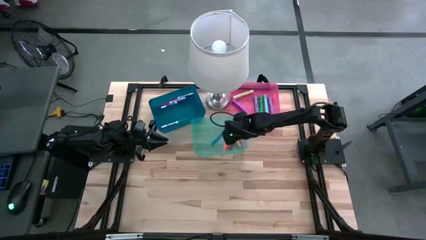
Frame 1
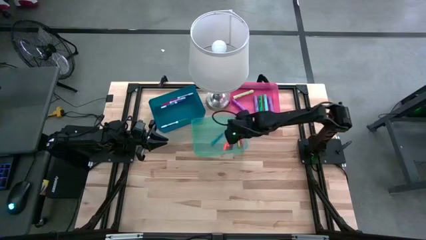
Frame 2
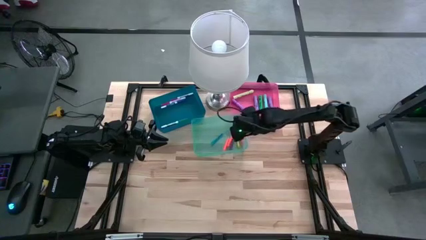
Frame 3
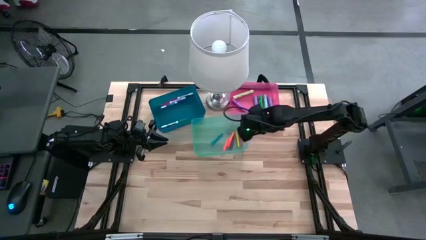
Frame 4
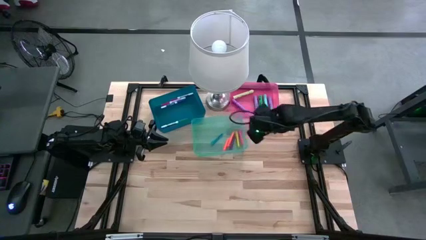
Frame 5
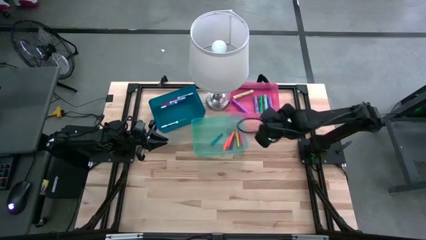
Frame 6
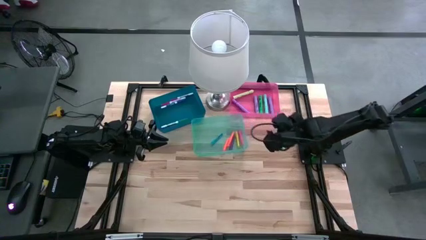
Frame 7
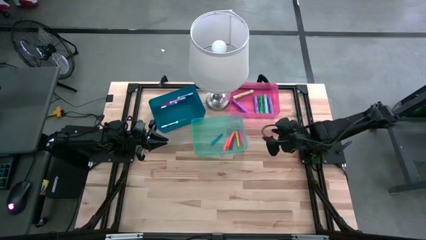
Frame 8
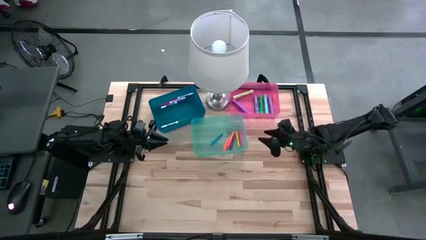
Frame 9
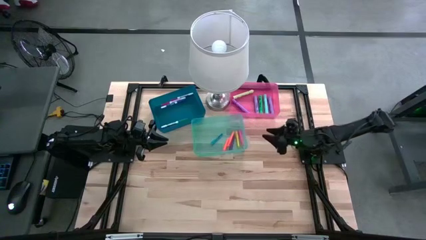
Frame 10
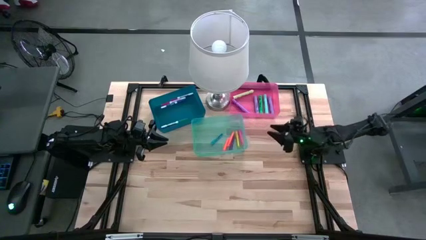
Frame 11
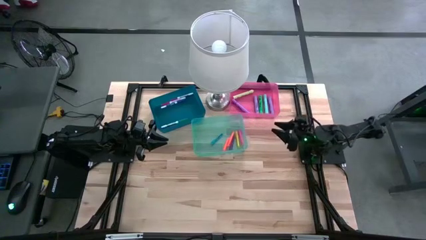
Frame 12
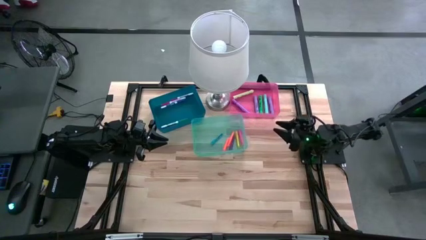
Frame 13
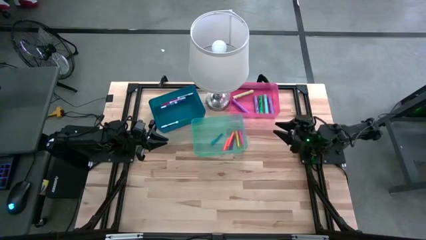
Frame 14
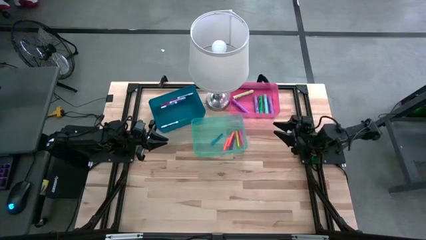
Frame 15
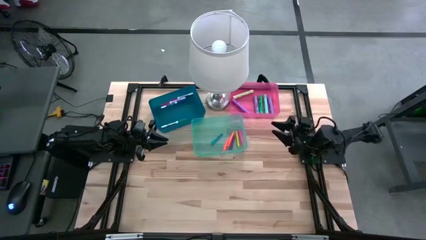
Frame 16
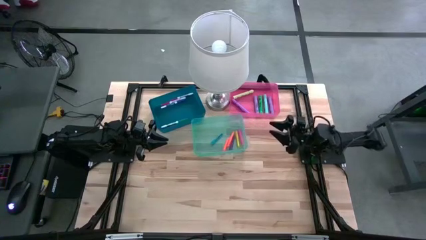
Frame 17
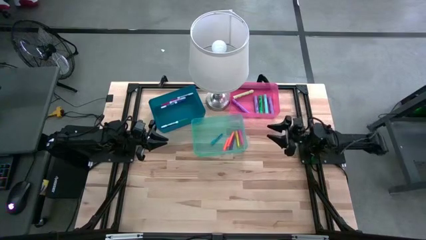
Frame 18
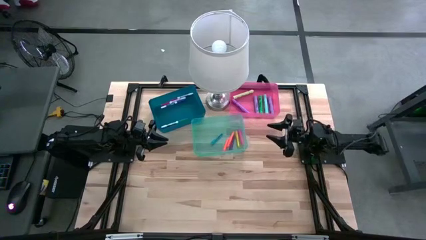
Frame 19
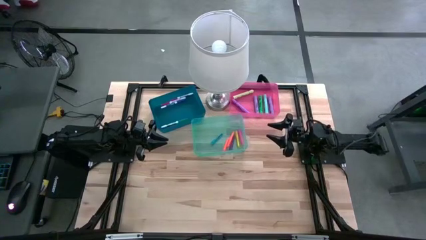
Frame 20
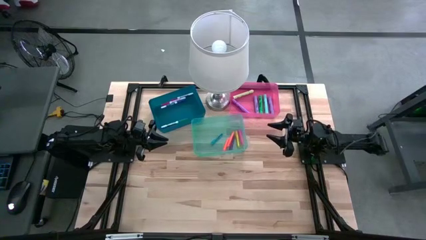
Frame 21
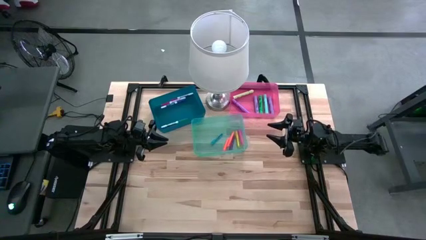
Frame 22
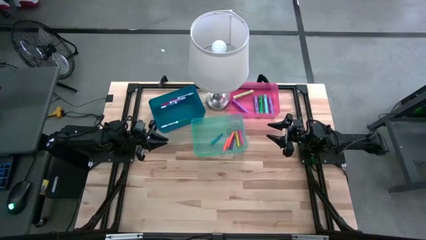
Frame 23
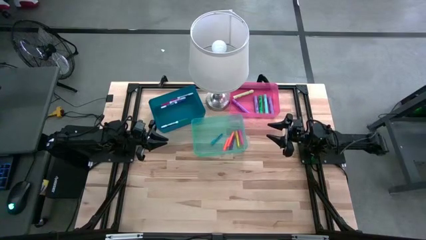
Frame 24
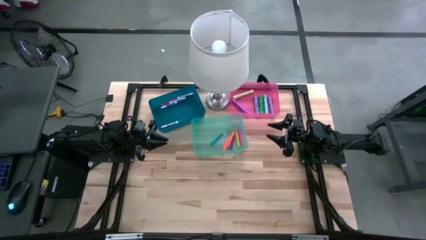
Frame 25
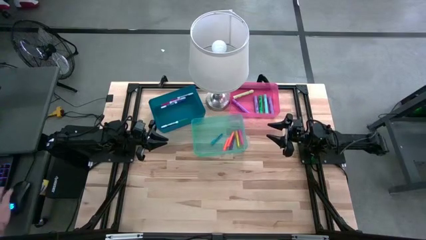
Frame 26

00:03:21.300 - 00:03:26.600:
Task: Pick & Place Markers
Return to Home Position

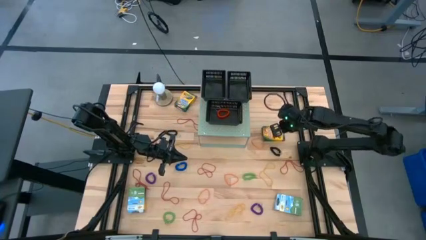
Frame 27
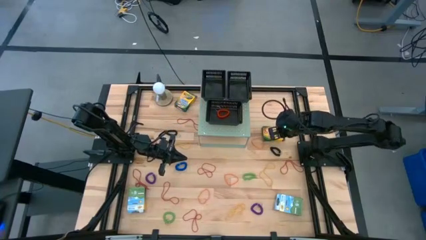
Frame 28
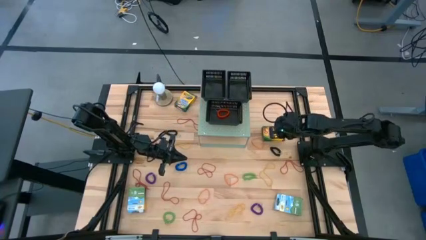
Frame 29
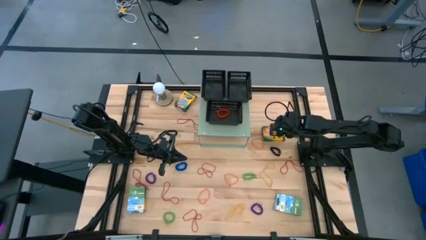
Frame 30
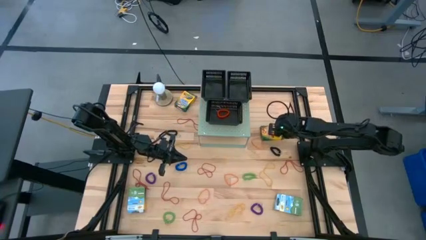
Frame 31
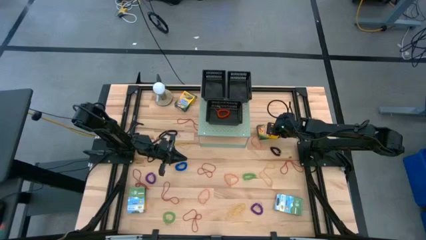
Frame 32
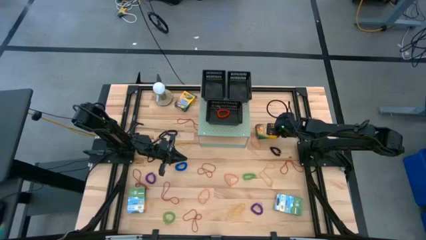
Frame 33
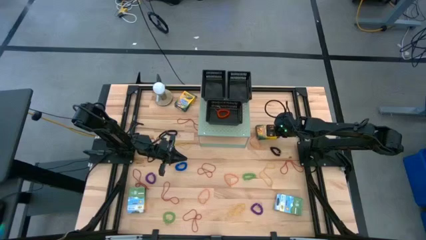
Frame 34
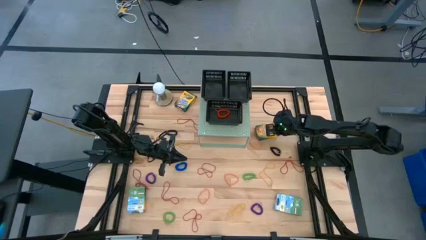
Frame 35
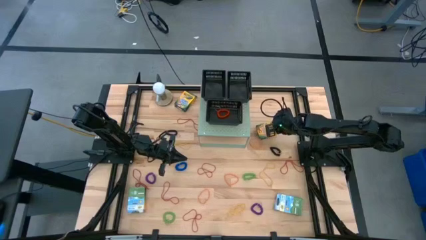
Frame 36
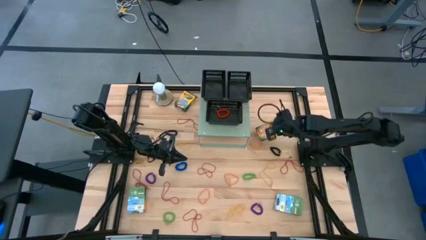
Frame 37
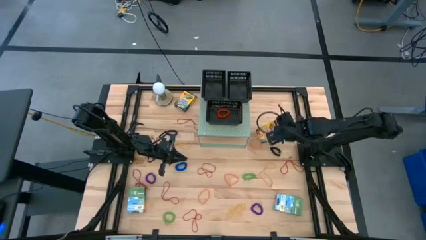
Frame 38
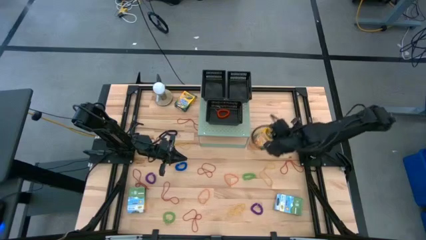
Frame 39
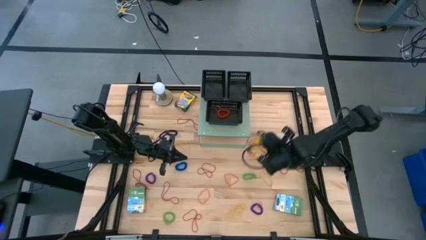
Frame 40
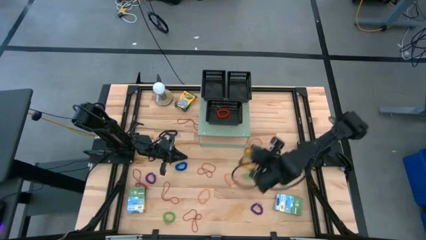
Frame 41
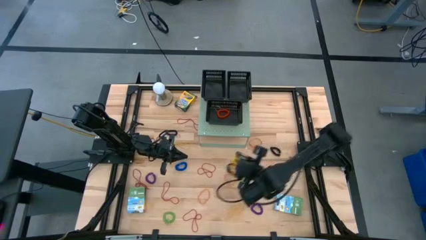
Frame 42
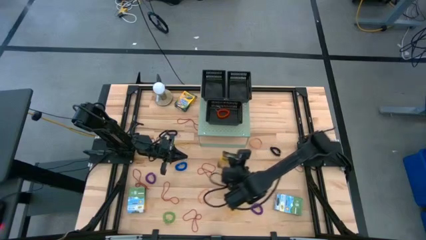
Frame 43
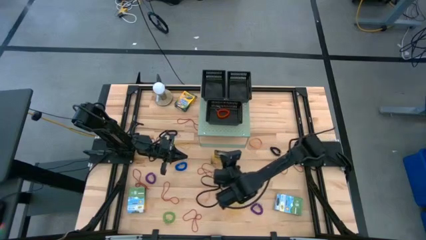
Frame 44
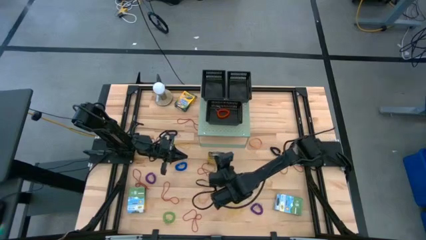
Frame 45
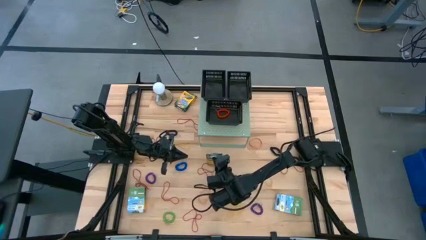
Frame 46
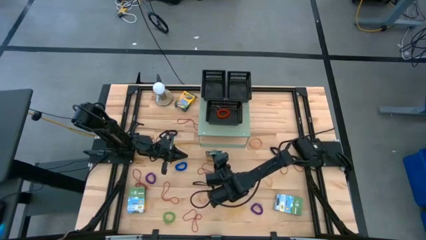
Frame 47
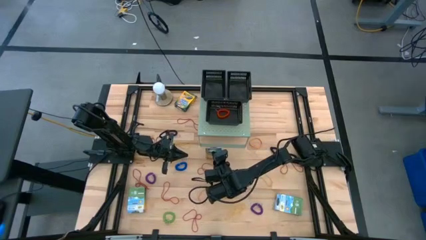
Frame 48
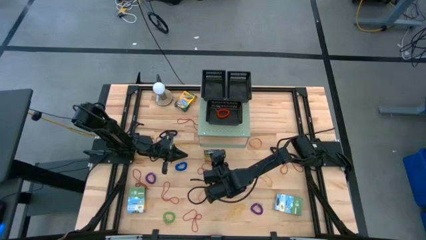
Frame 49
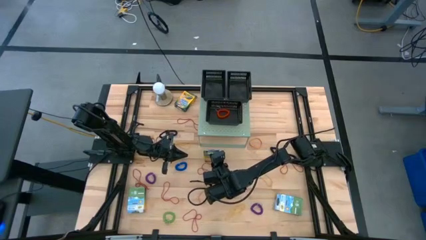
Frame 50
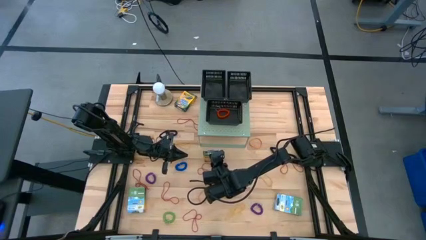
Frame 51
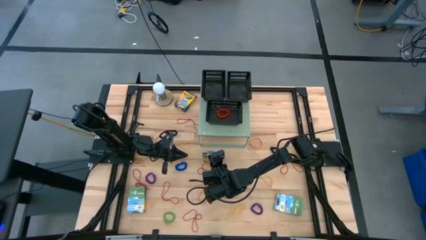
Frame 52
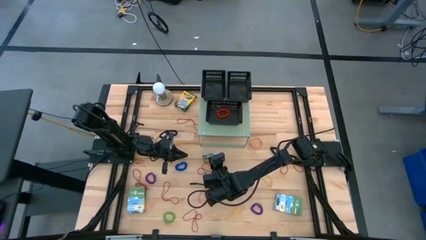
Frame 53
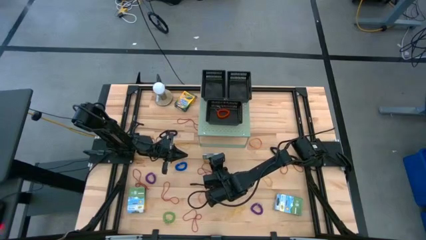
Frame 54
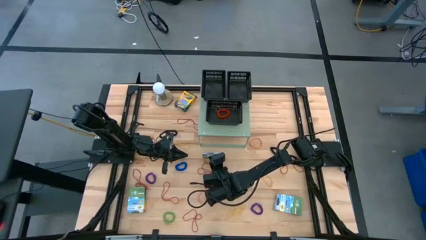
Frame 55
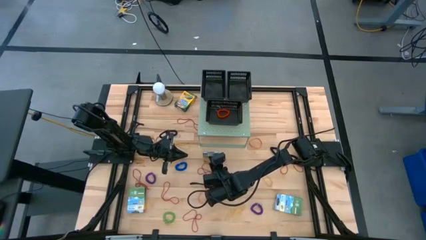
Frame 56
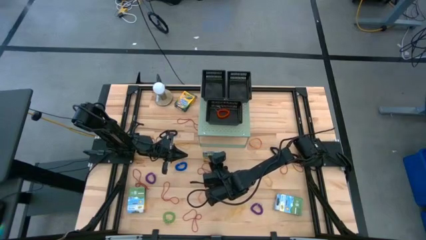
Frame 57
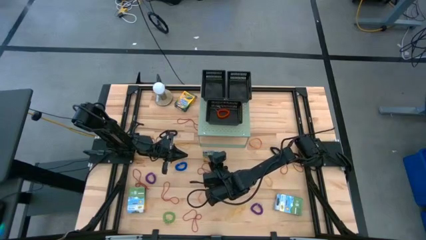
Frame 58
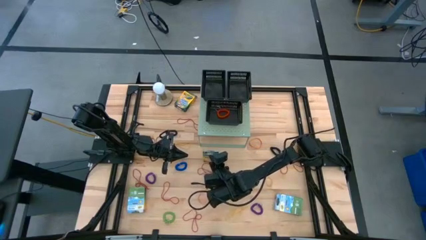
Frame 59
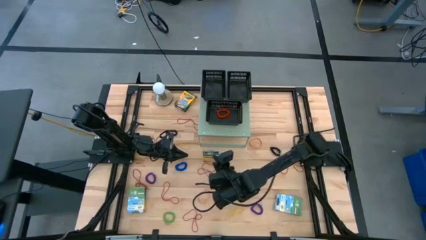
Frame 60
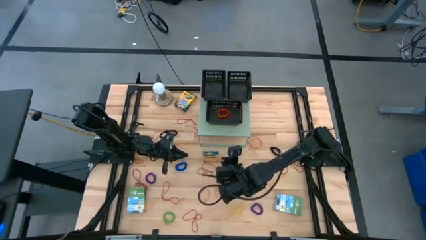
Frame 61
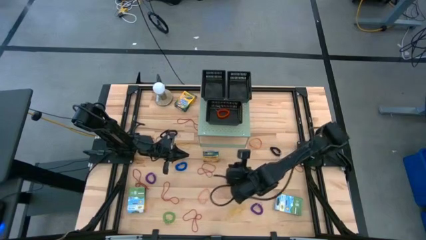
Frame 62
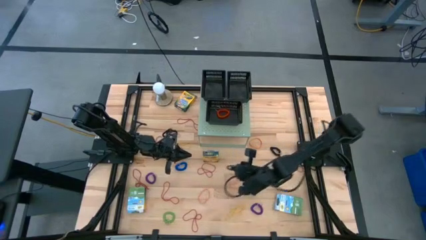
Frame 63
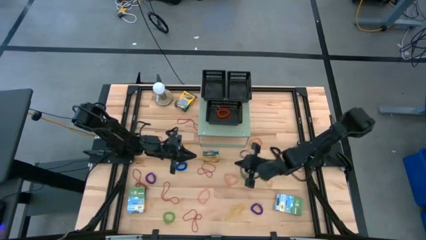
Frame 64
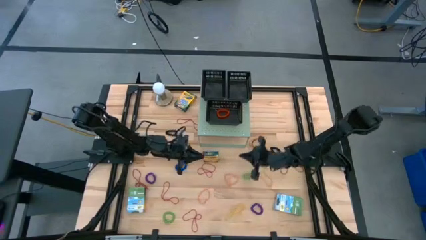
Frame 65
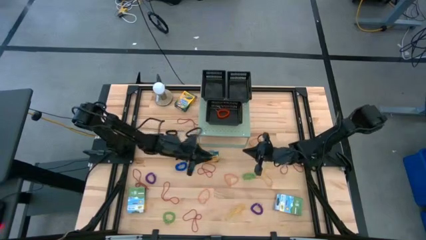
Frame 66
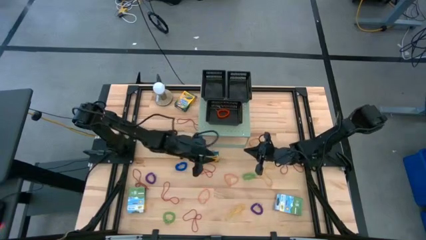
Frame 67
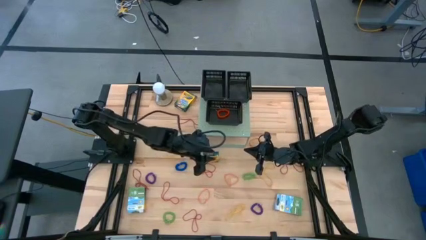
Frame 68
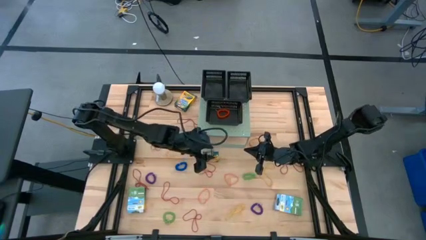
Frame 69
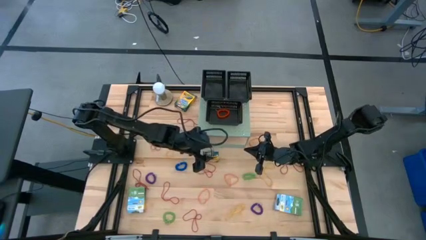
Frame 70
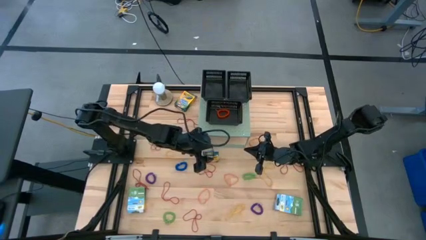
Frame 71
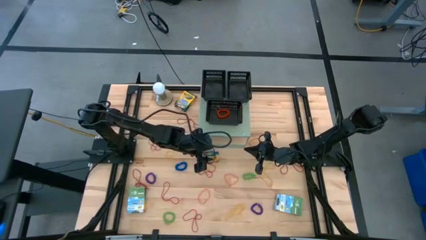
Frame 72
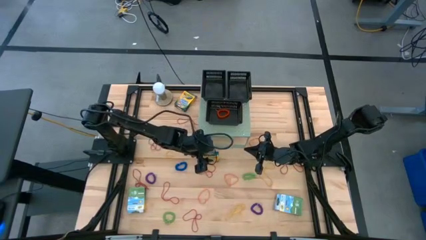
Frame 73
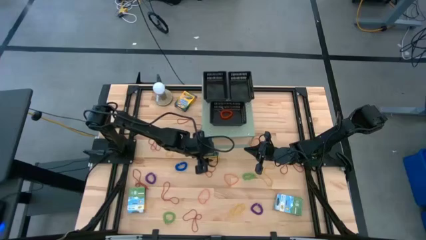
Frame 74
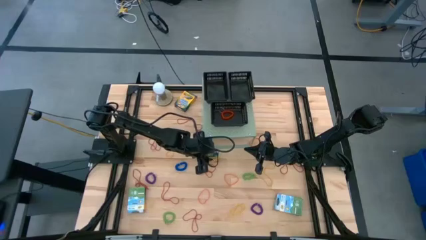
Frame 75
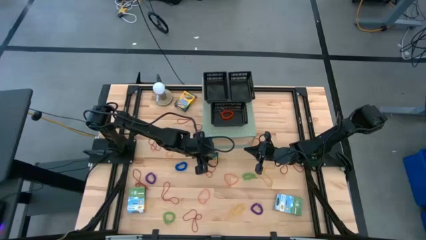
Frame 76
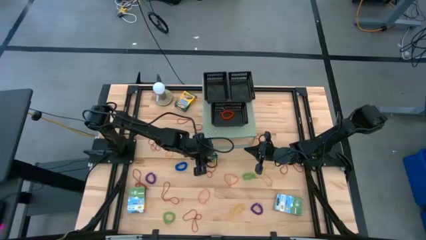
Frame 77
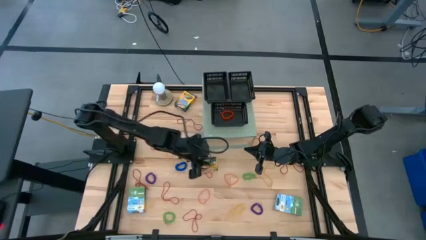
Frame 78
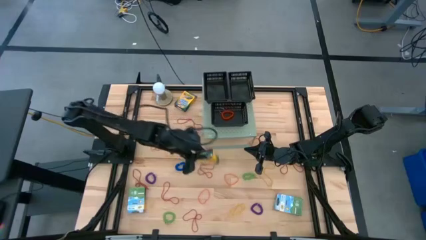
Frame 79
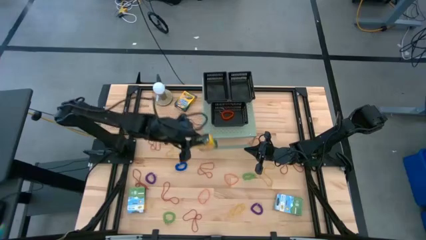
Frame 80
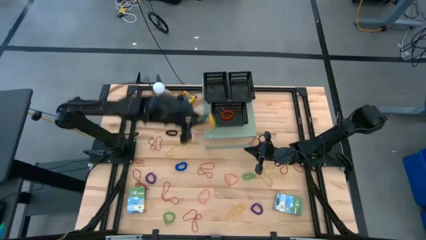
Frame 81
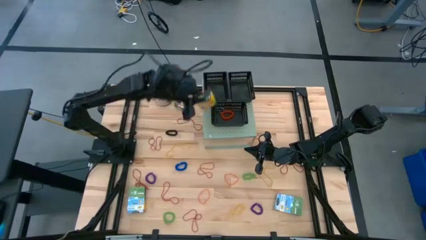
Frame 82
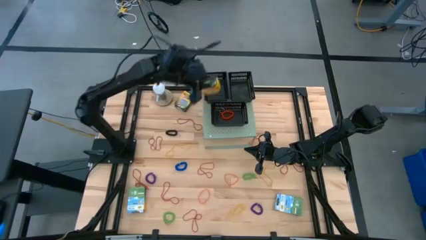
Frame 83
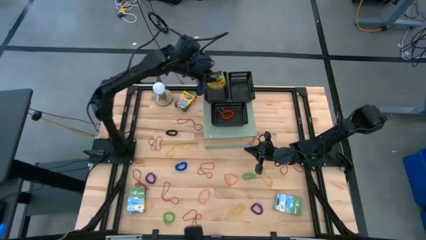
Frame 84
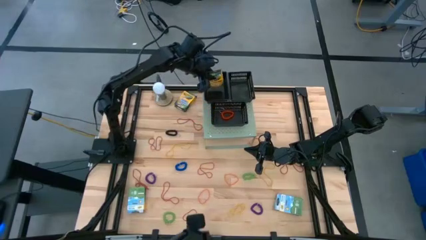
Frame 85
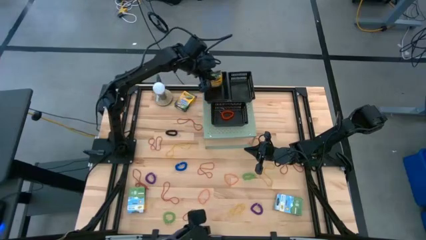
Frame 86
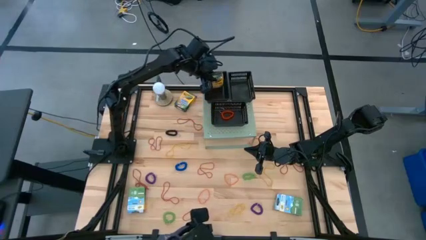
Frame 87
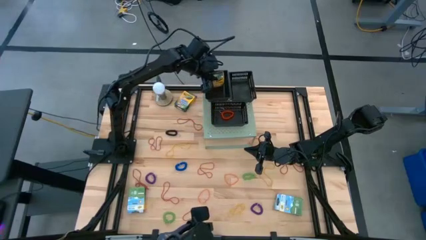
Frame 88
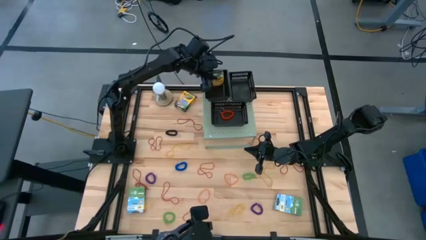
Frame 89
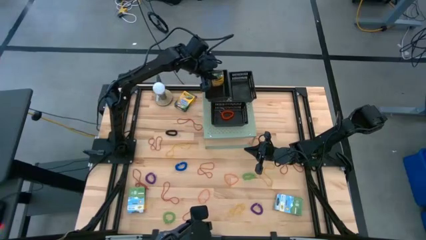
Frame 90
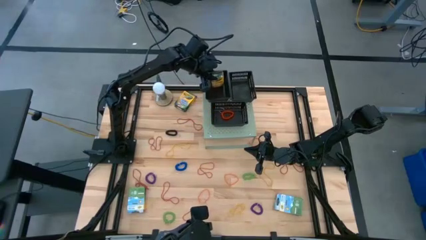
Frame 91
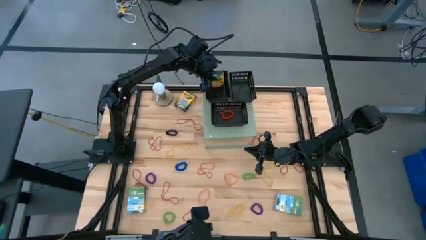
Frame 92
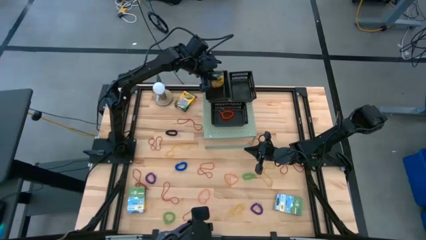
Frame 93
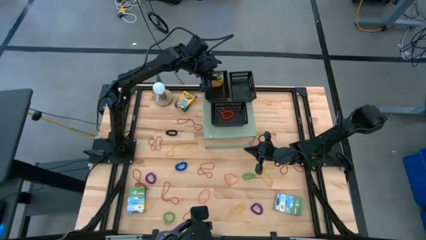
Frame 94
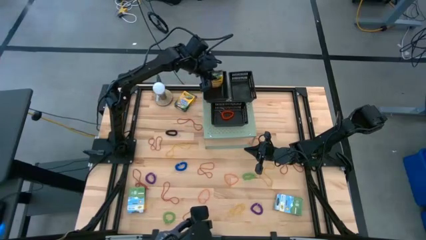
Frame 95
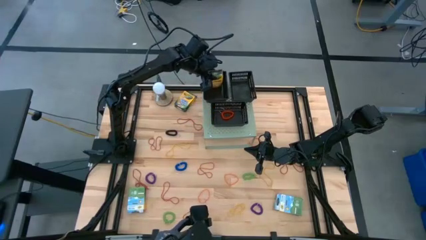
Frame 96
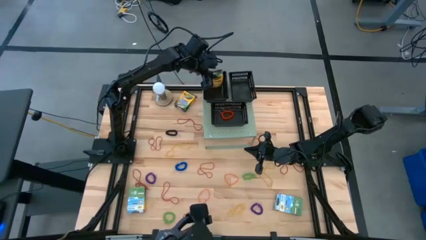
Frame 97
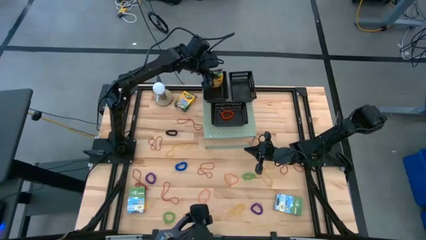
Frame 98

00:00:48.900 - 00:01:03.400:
Task: Pick & Place Office Desk Supplies
Put the yellow crayon box into the top left black bin on the shelf
